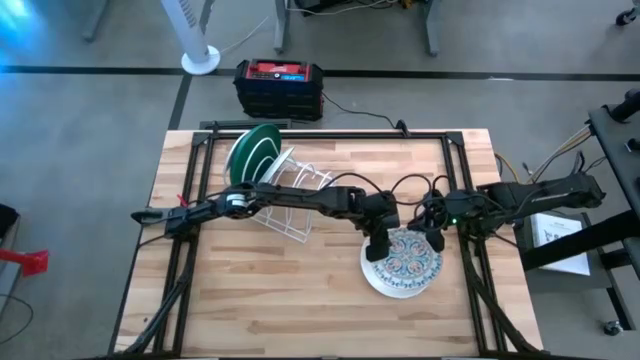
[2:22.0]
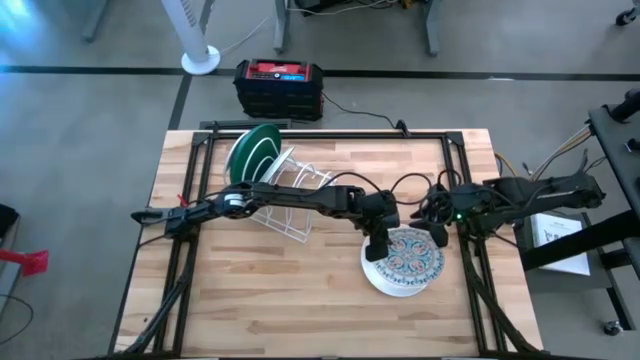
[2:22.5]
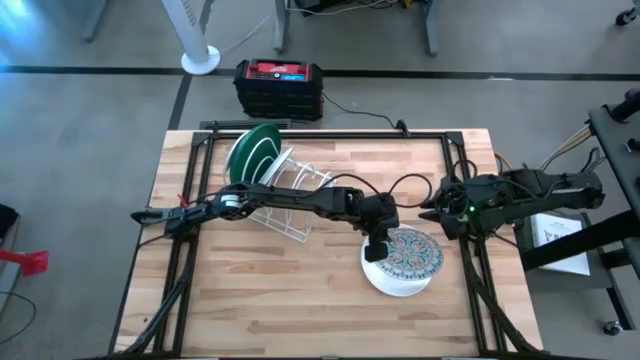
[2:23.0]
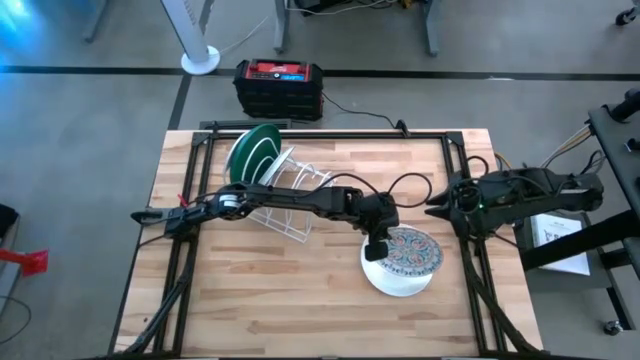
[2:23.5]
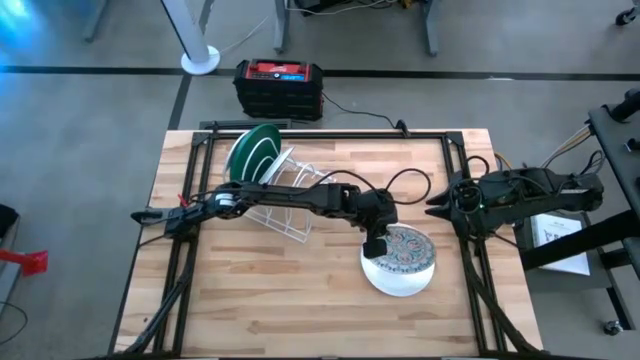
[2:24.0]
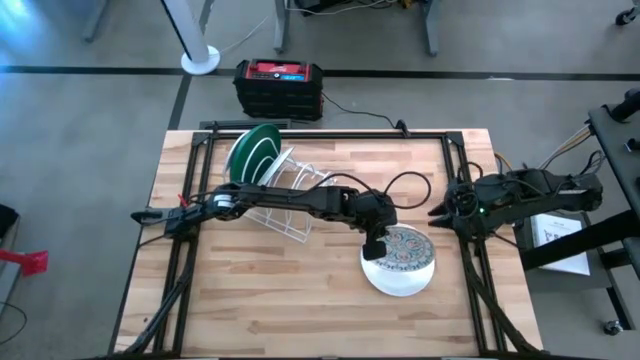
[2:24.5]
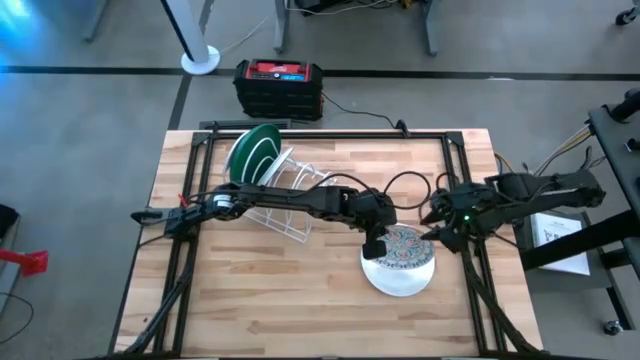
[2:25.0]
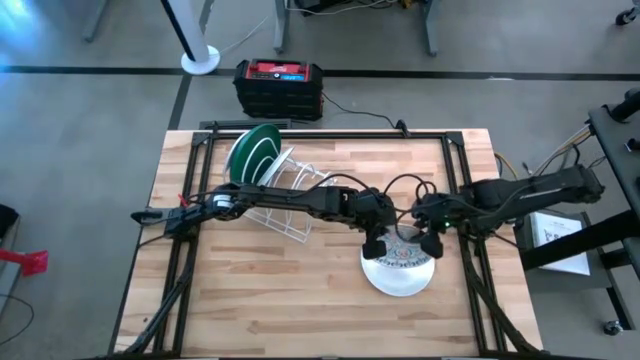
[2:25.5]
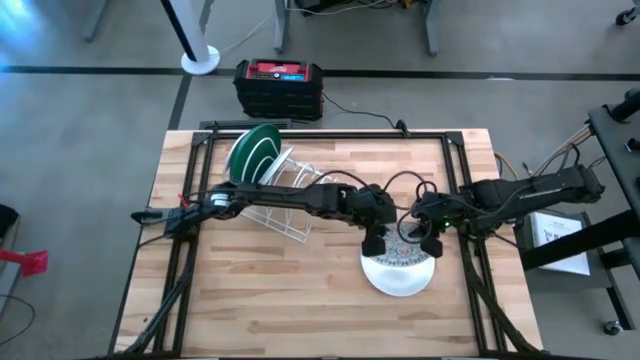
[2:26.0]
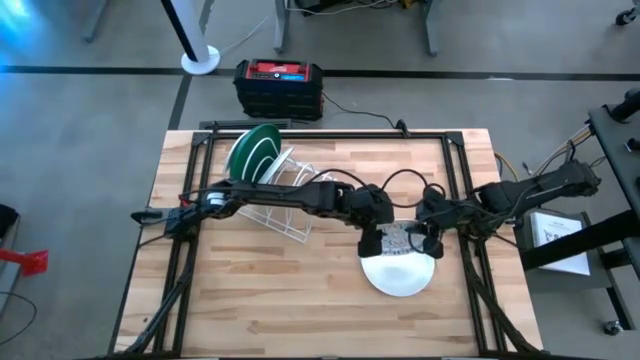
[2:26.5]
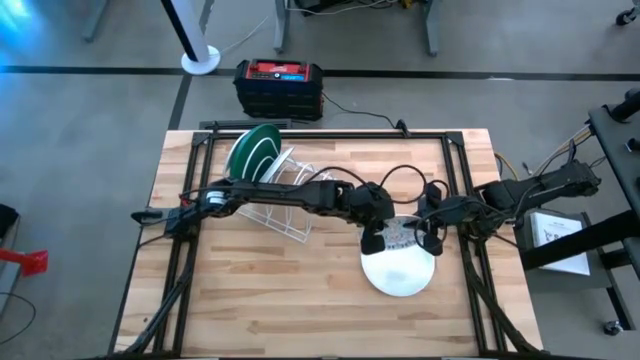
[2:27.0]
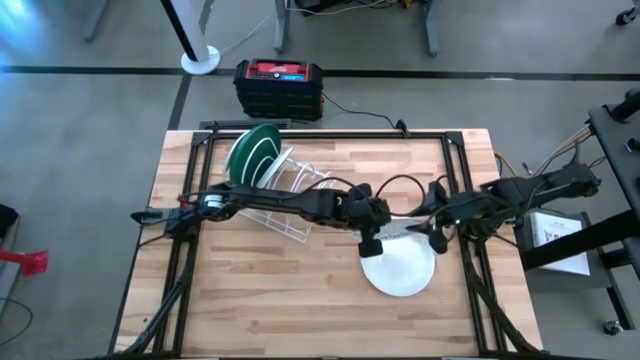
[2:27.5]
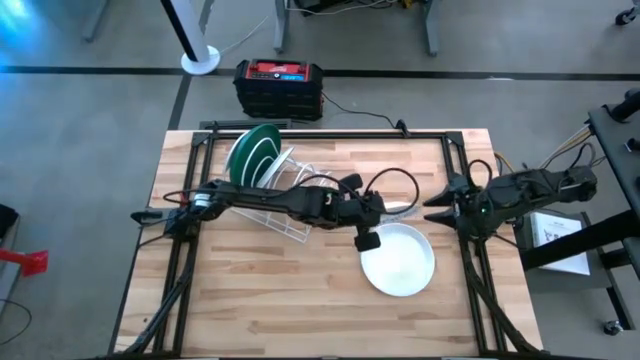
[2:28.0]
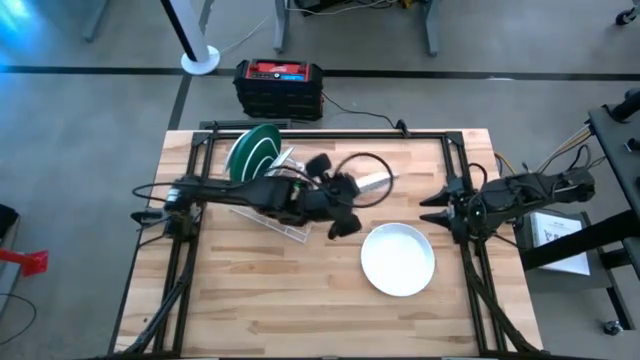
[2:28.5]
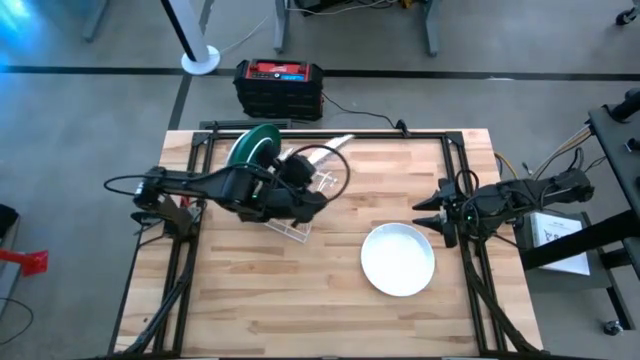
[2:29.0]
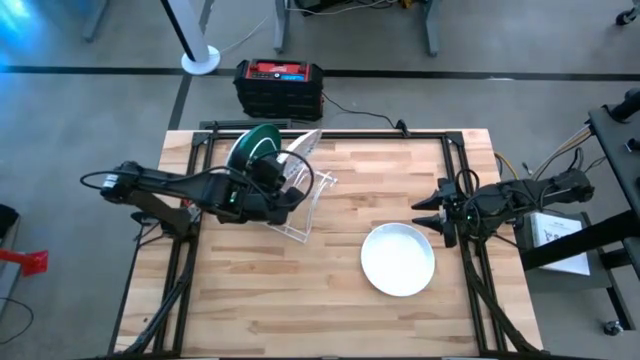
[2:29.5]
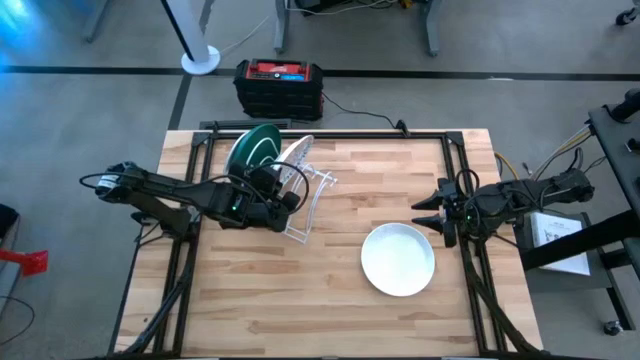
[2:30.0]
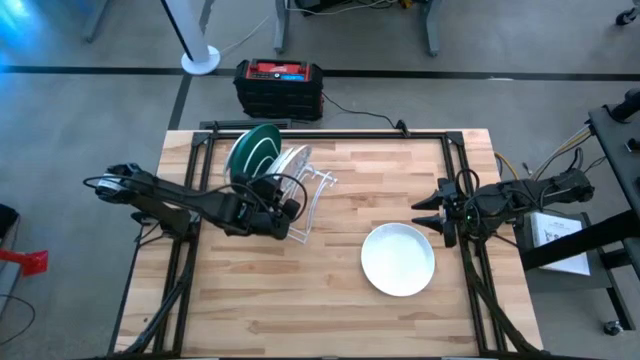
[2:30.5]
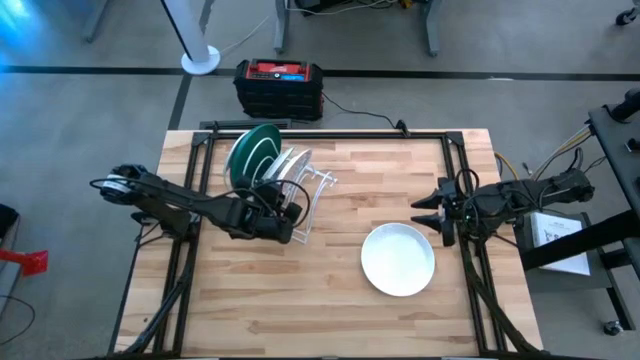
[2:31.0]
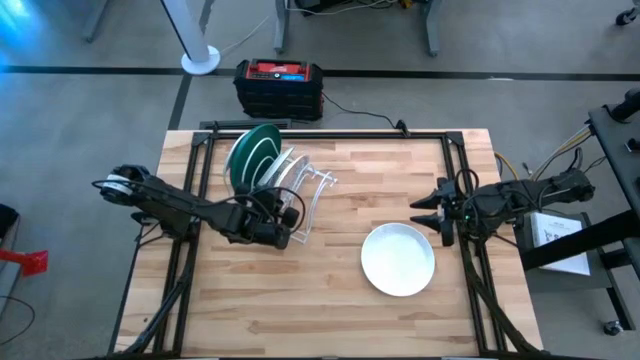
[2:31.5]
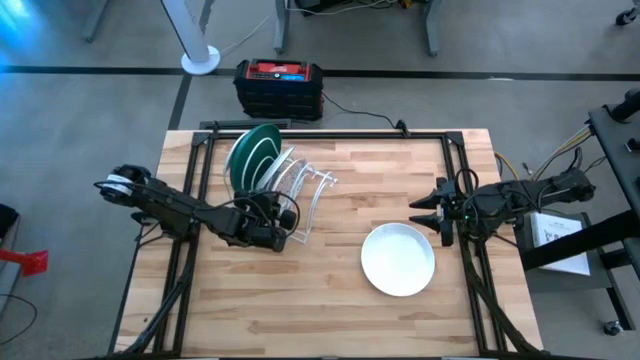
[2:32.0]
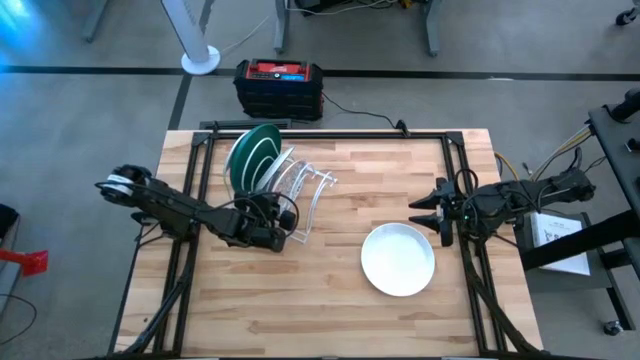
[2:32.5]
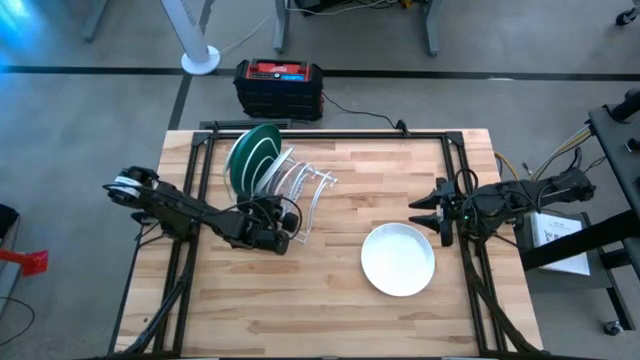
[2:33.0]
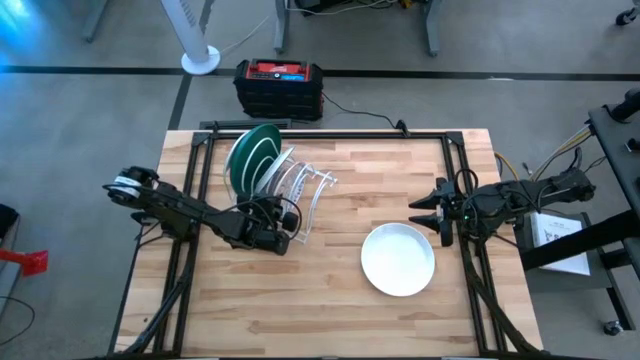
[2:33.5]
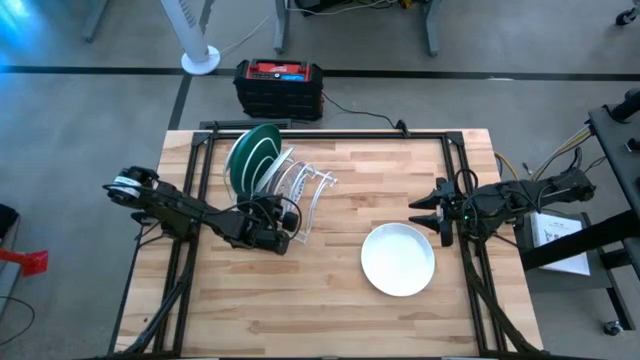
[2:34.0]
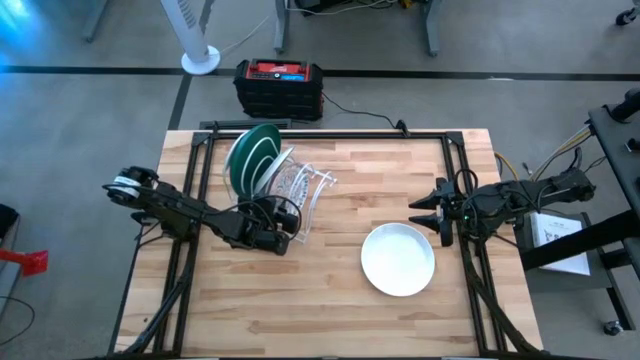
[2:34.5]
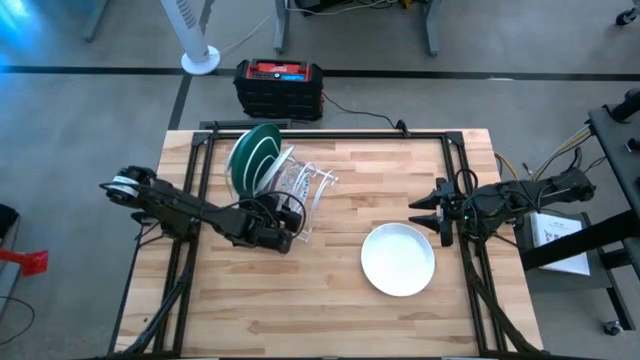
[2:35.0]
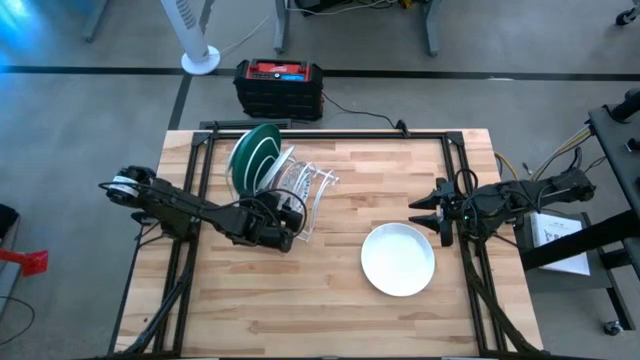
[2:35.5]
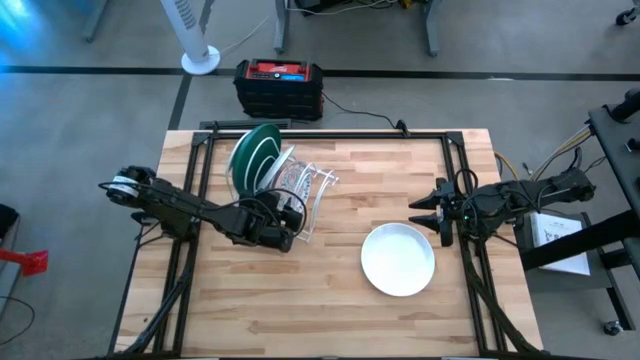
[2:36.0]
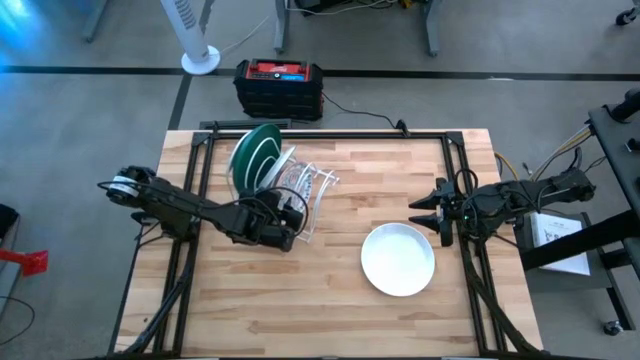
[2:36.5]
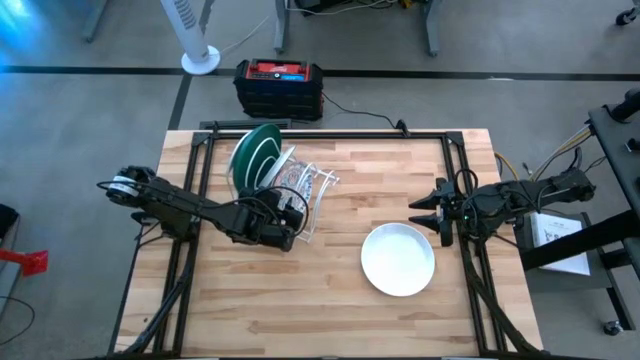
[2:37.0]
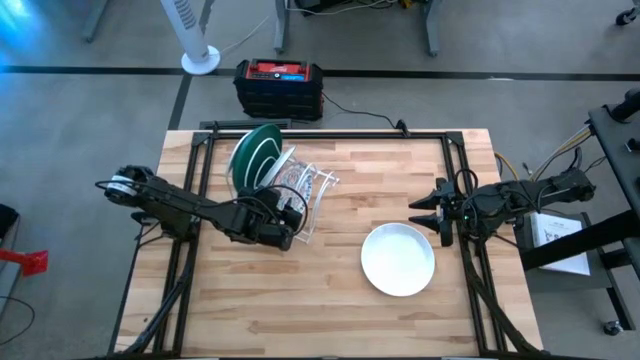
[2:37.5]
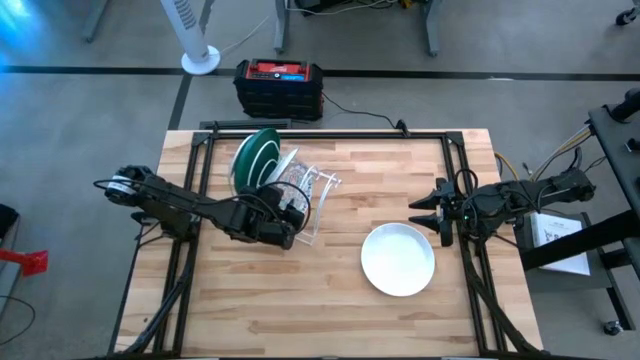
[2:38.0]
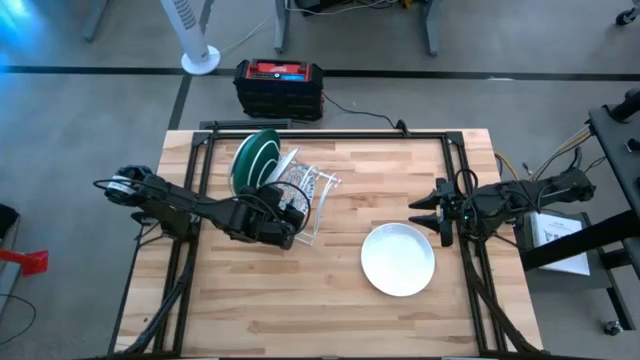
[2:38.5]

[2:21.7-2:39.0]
Task: Sort dishes
Put the blue orange patterned plate in the dish rack

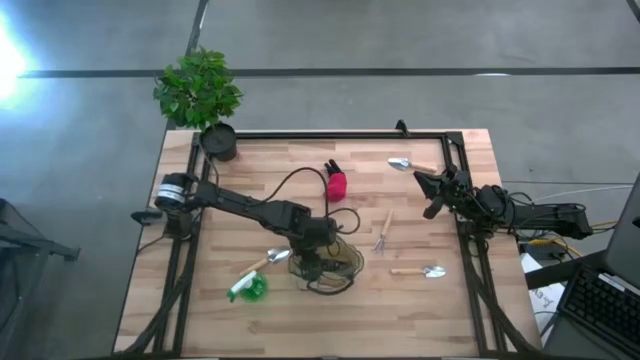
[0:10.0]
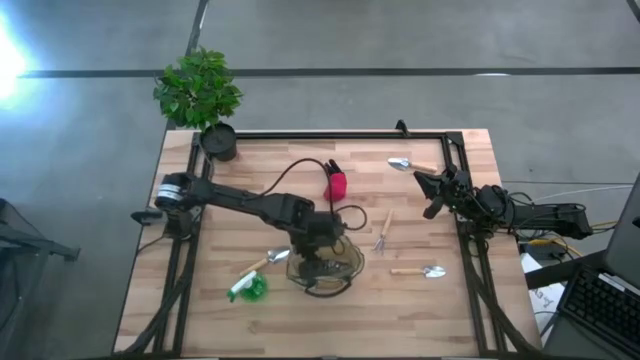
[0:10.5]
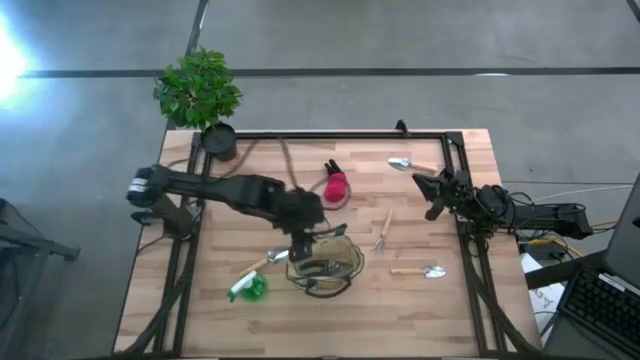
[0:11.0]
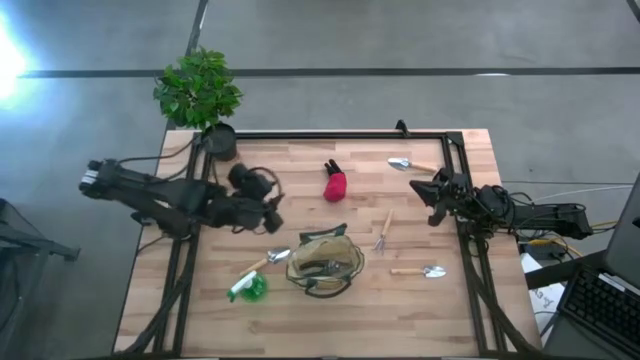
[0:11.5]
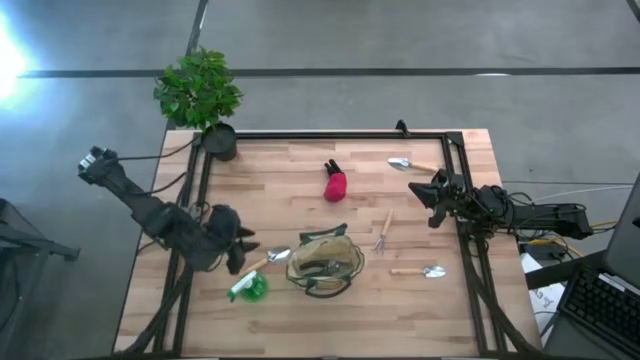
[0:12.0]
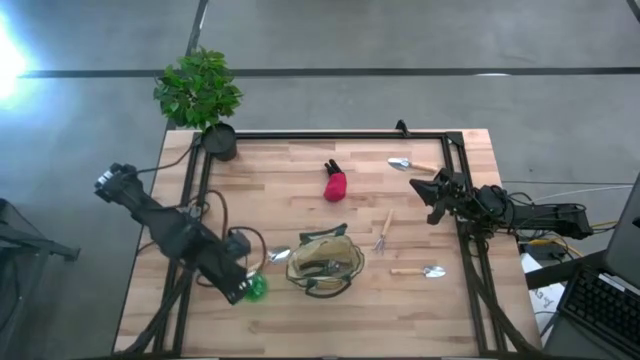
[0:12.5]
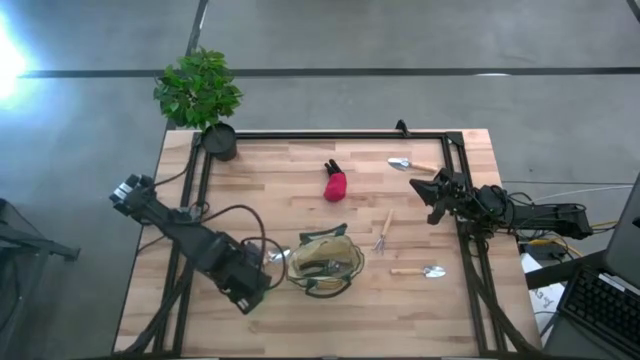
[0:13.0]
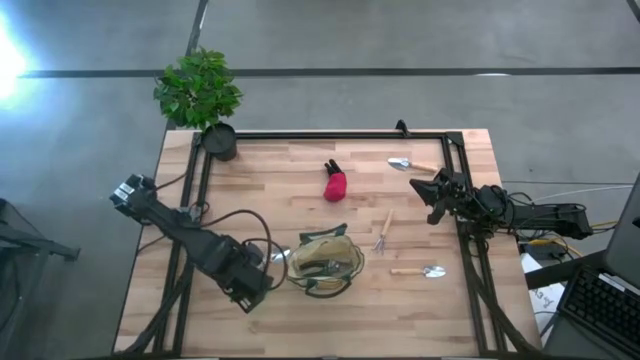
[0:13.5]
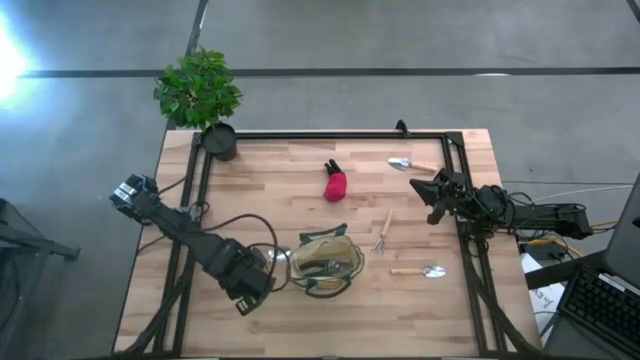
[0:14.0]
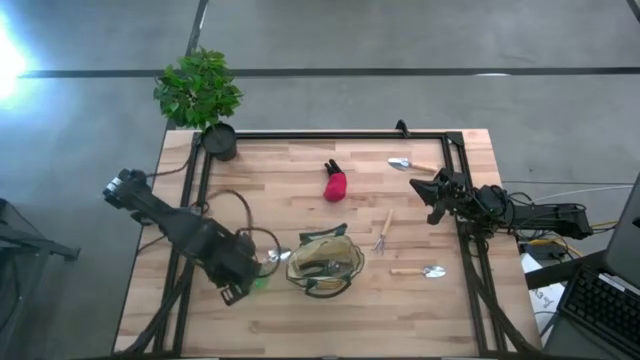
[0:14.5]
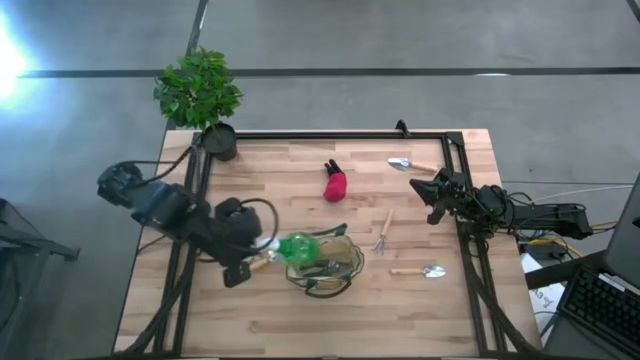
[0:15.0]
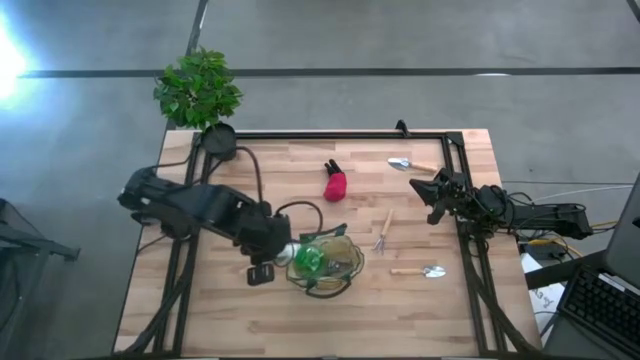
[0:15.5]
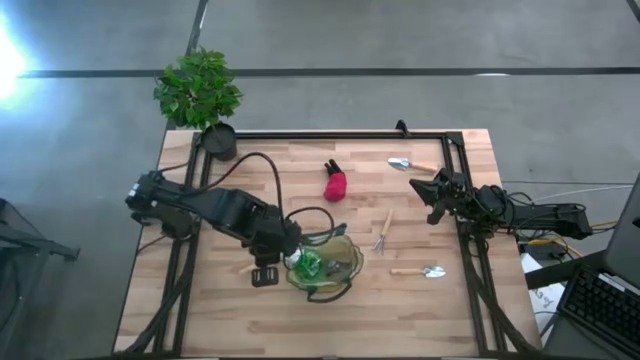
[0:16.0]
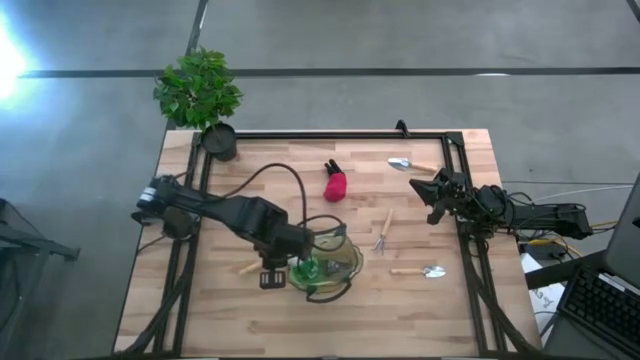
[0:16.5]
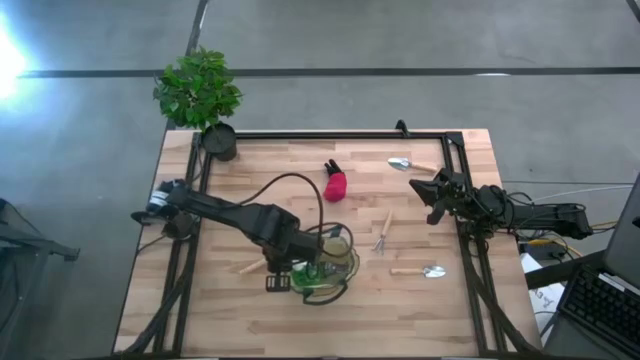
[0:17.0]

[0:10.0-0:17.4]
Task: Pick & Place Garden tools in Gardening bag
Put the spray bottle into the gardening bag
